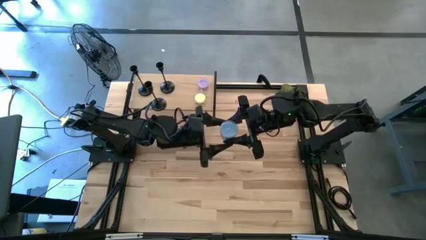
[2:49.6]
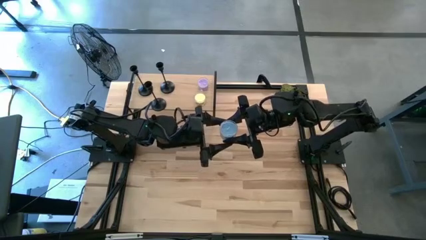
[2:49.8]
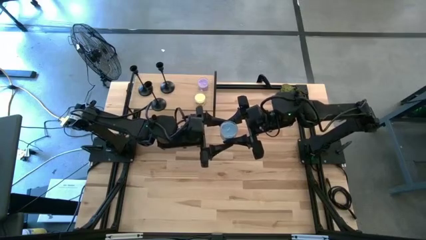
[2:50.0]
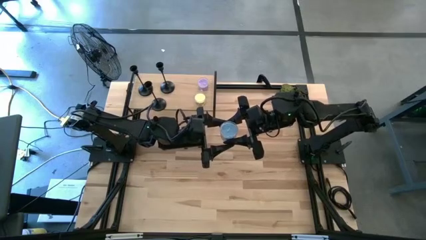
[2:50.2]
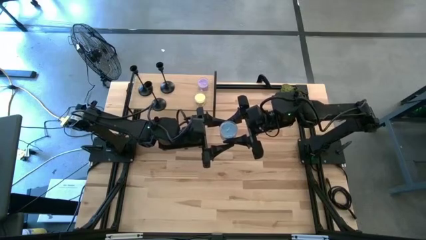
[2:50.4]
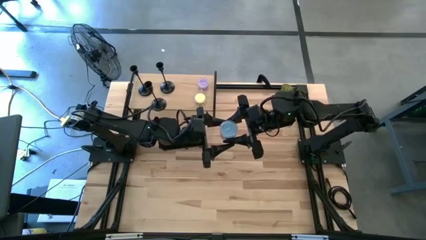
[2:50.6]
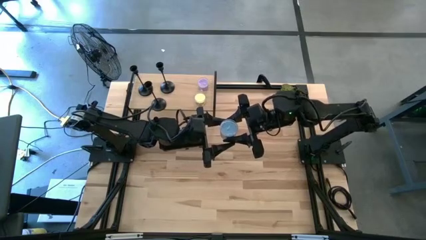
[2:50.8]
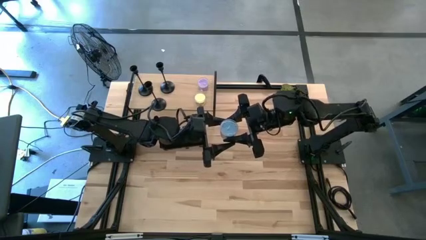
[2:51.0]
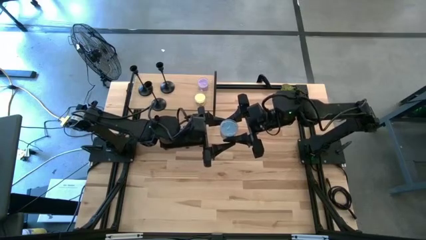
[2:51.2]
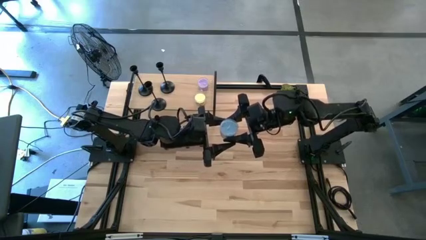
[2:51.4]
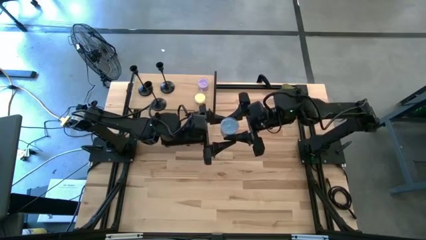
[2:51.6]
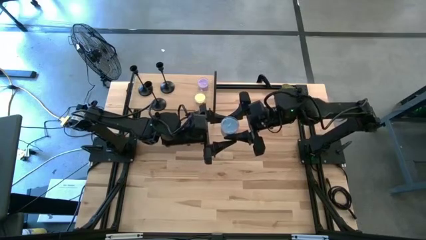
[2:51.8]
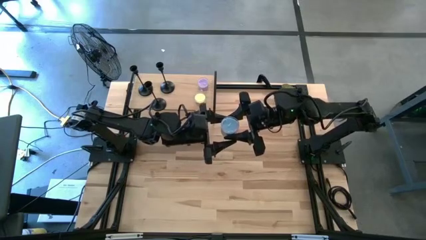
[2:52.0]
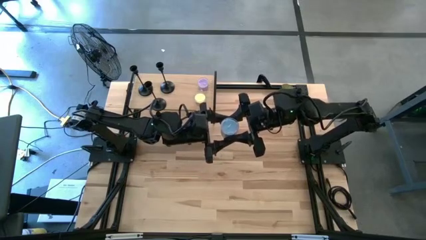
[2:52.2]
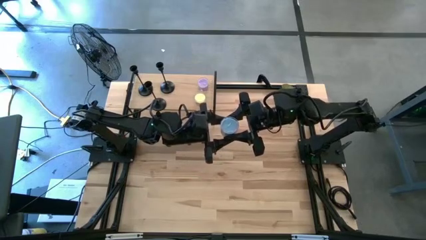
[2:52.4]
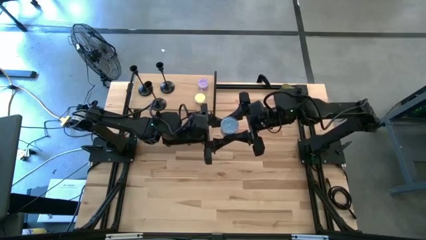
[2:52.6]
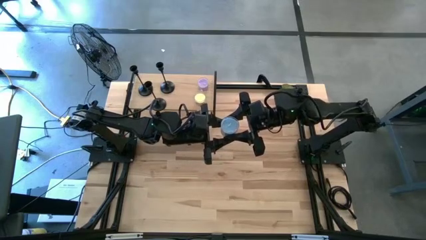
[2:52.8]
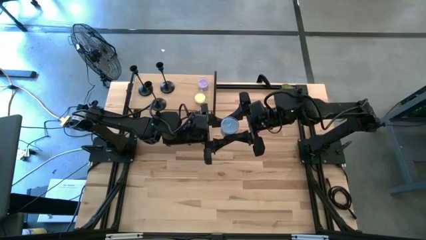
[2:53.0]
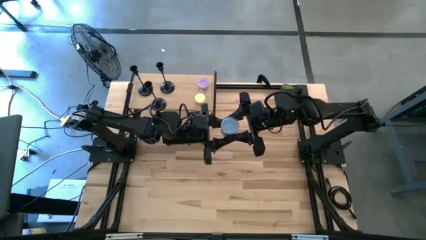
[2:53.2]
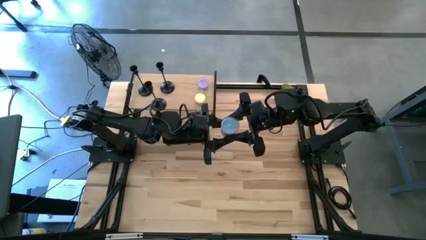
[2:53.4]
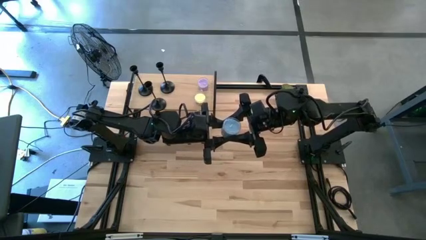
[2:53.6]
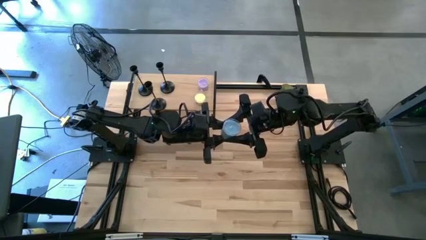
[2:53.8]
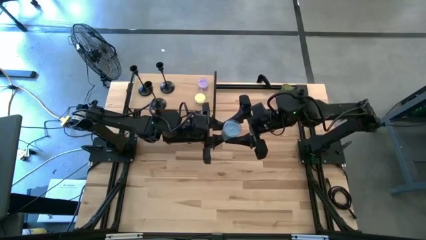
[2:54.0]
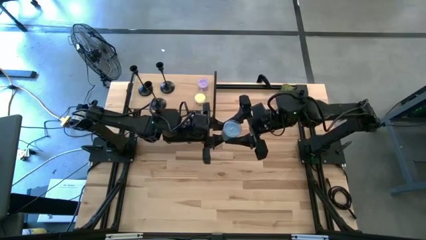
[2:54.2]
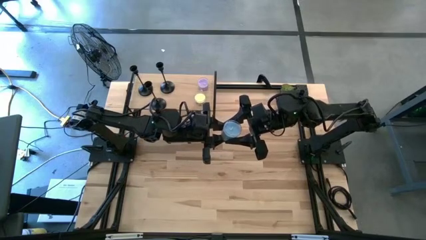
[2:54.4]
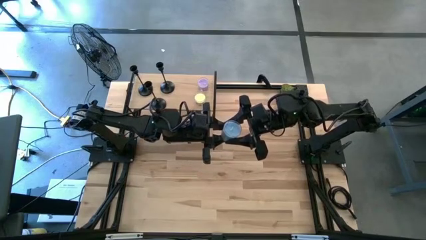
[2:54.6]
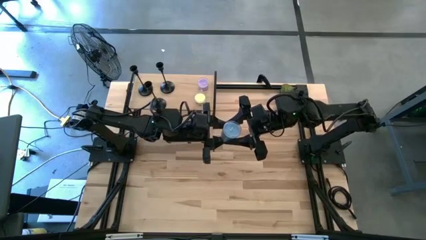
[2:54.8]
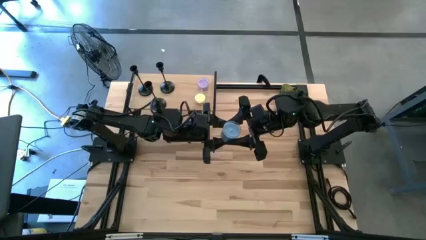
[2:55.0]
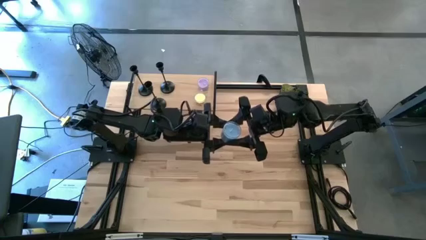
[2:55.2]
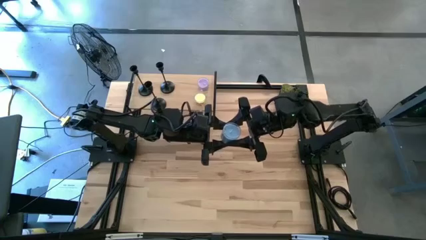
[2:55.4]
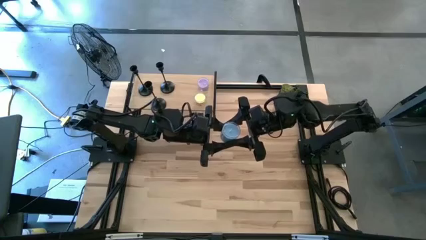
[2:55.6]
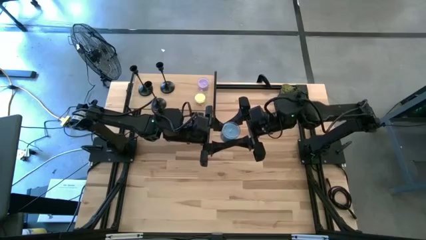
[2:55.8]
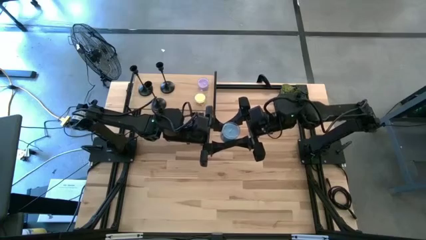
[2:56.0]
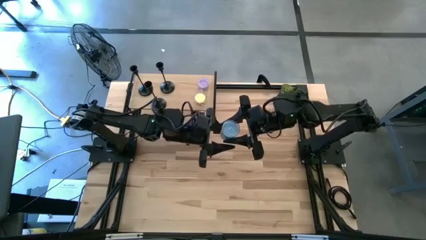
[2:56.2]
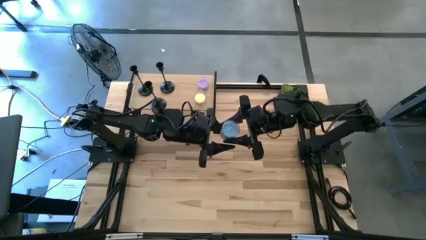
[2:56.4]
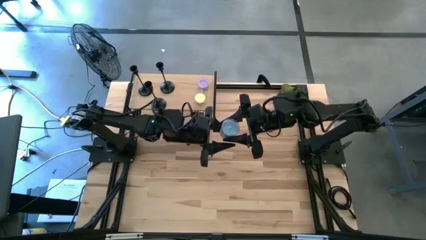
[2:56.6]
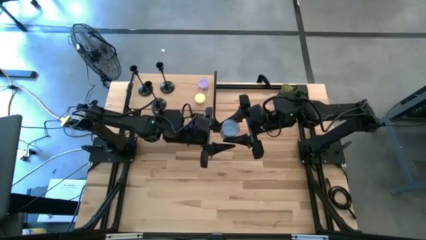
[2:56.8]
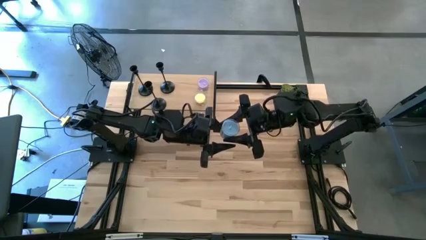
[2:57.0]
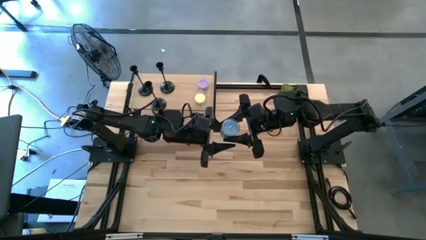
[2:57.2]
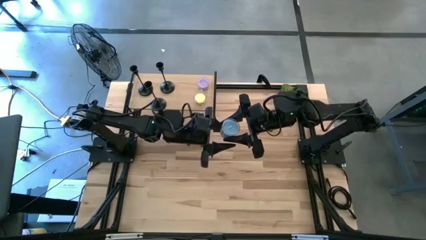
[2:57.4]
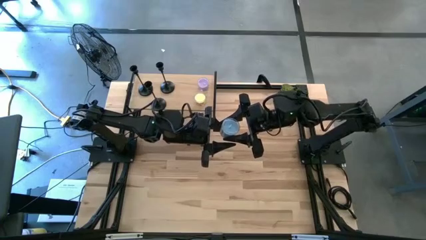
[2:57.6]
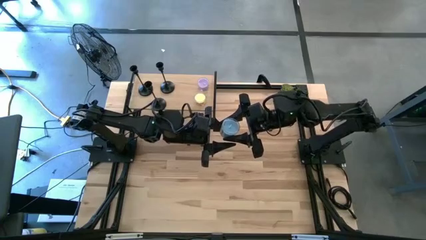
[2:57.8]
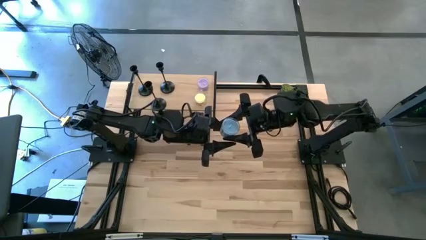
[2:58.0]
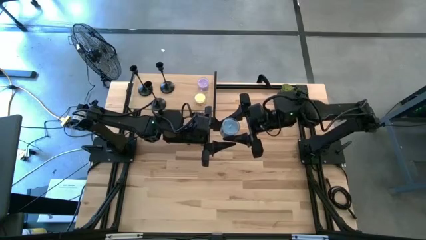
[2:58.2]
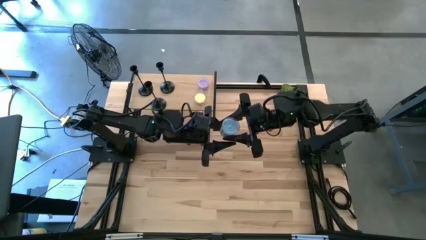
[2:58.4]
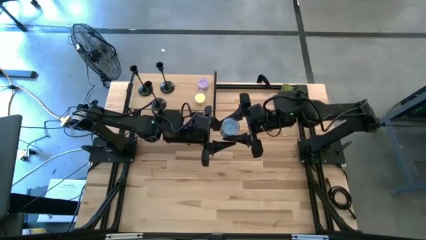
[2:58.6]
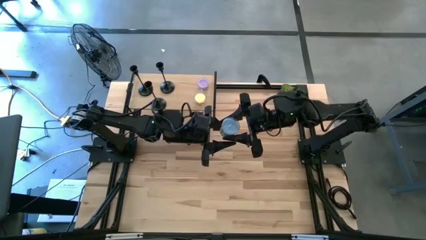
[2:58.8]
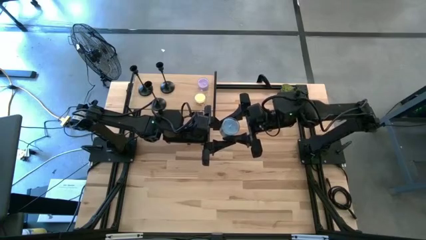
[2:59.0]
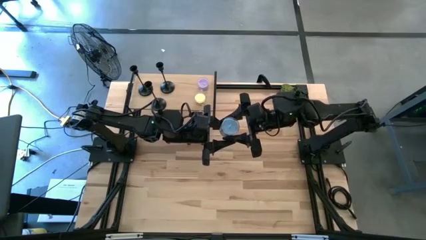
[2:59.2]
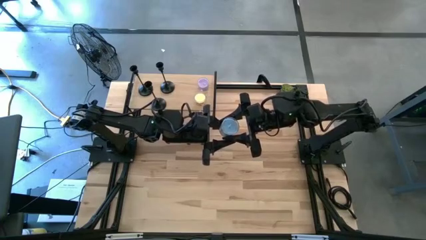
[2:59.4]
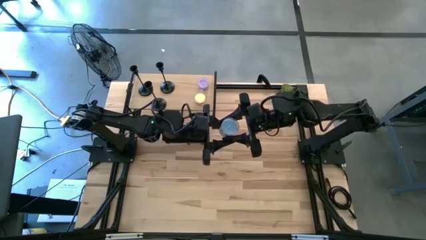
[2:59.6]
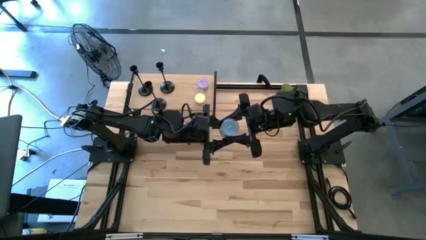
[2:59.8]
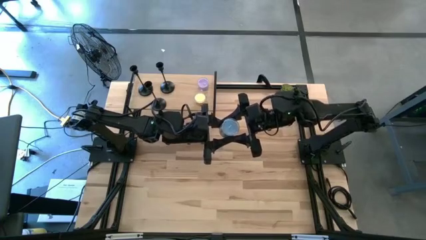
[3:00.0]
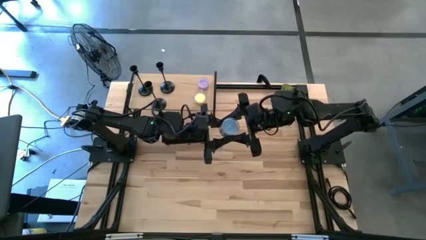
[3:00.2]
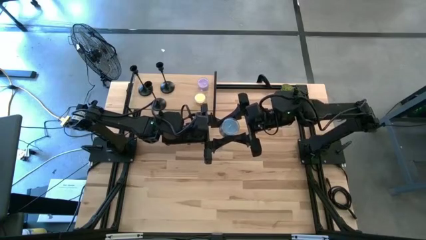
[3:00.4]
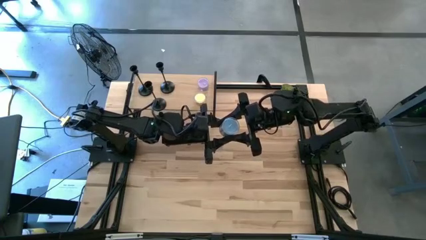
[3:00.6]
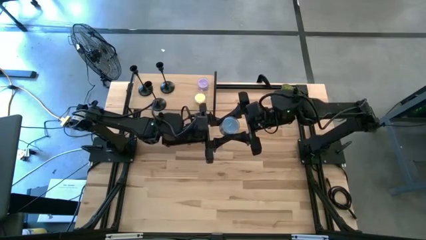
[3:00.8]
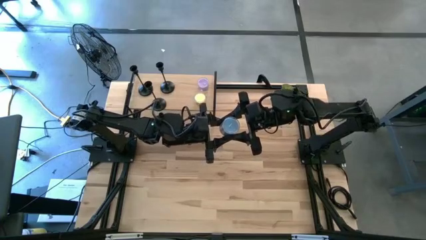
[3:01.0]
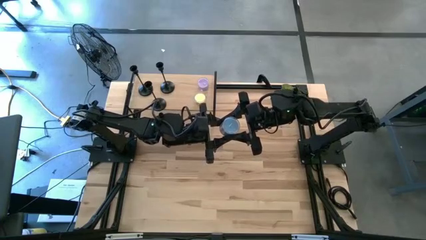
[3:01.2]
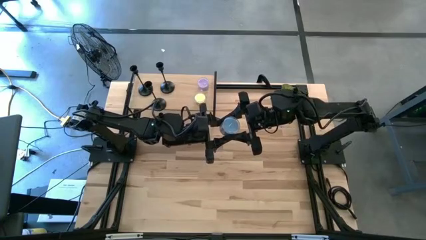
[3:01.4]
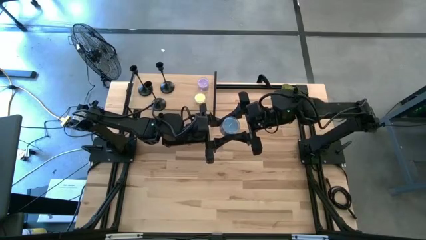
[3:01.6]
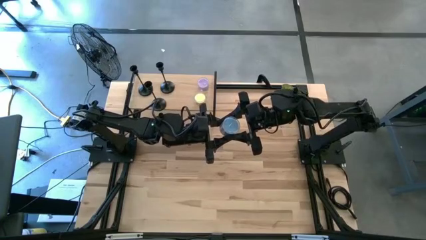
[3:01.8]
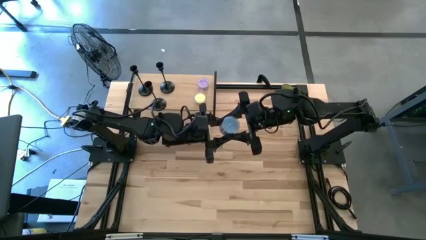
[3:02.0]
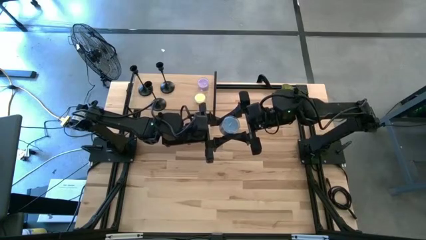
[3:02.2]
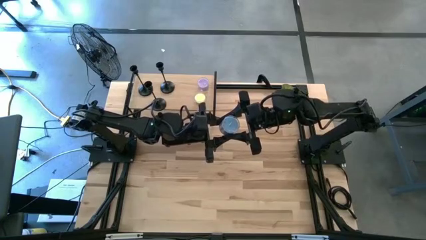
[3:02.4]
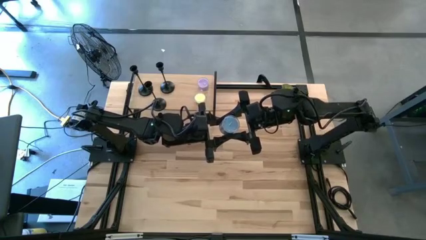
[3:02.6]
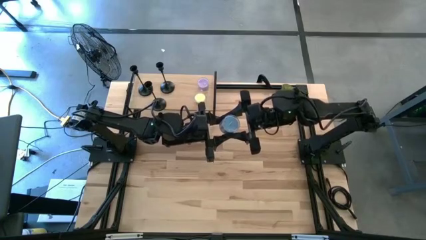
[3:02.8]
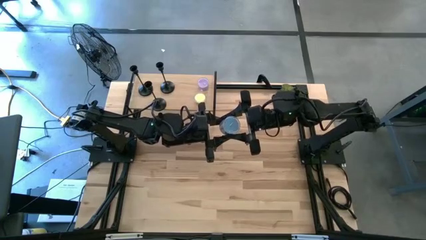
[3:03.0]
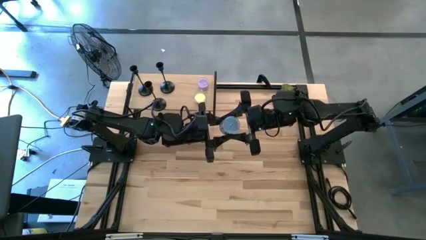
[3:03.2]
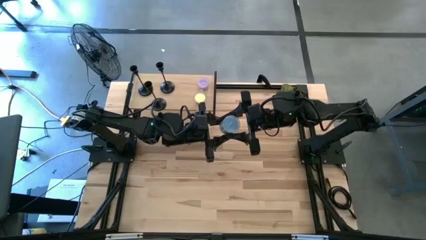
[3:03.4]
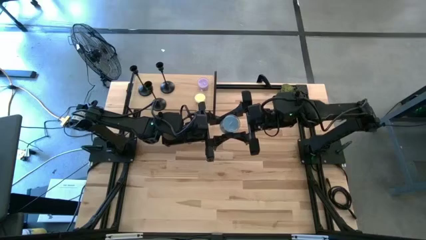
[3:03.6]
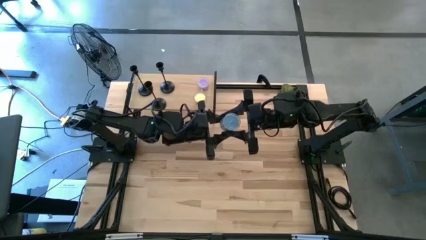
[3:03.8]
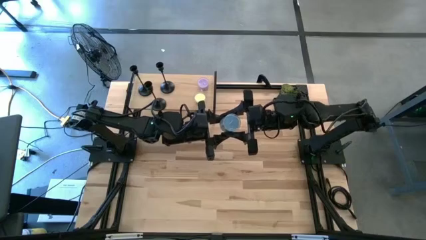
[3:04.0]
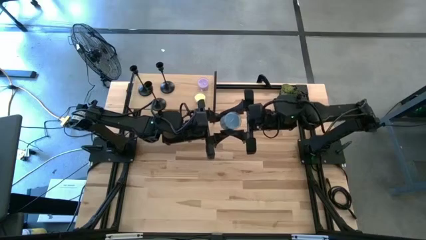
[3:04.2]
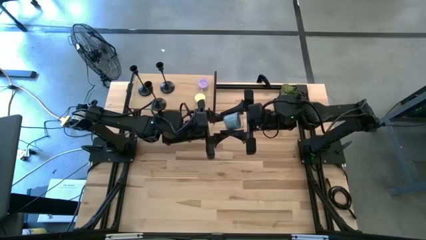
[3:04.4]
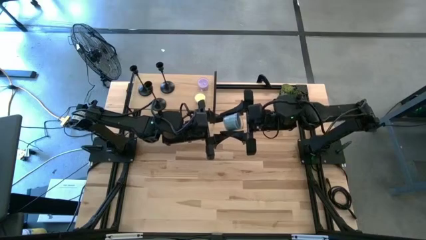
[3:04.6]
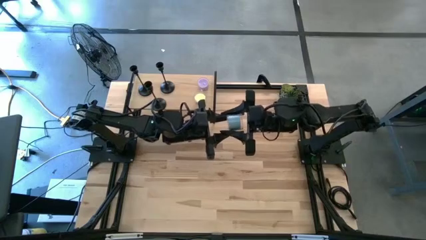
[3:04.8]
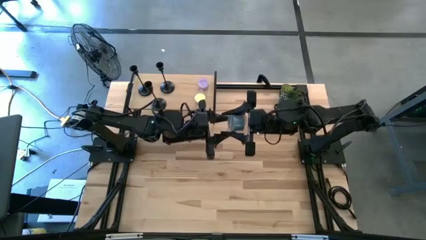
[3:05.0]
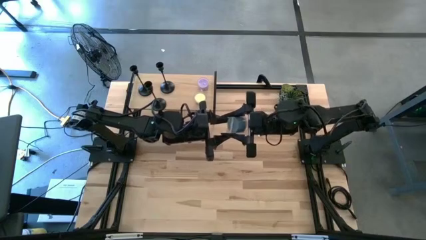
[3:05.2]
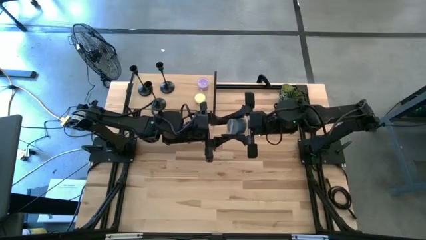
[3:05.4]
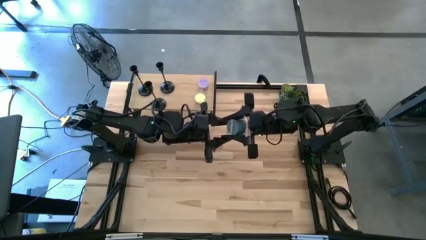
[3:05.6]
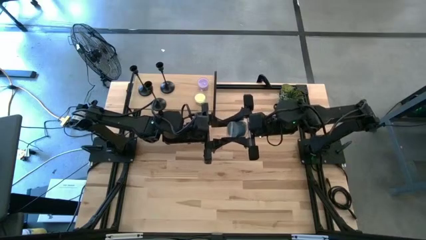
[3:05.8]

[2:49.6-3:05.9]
Task: Pick & Place candle stick holders
Put the blue candle on the shelf
